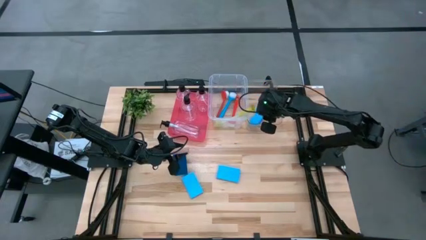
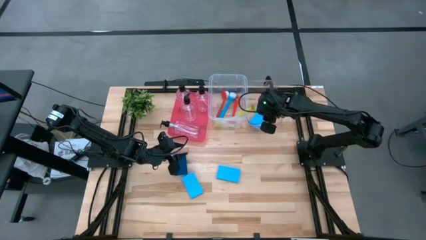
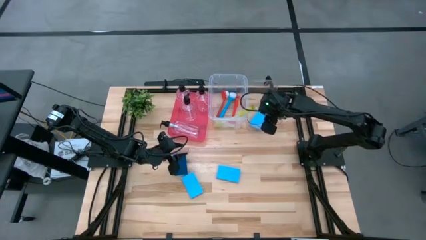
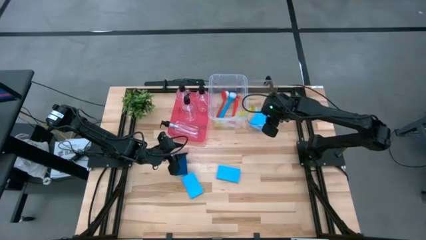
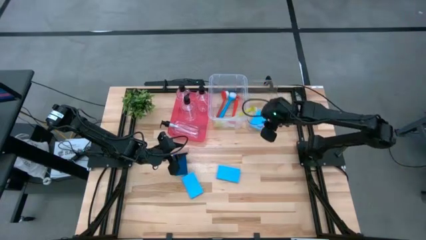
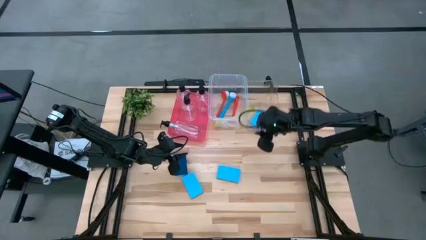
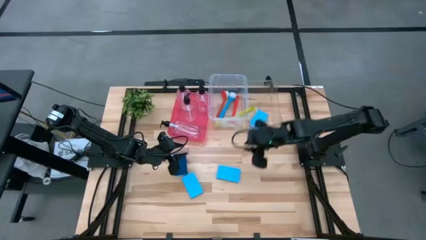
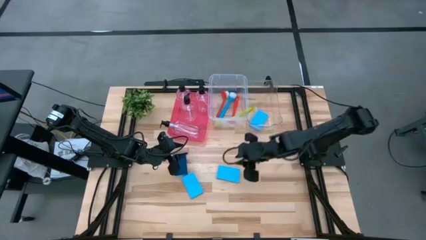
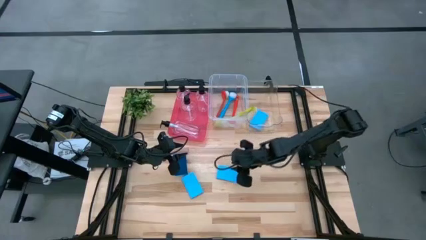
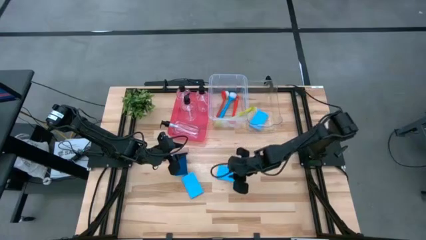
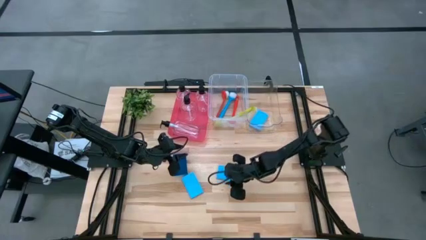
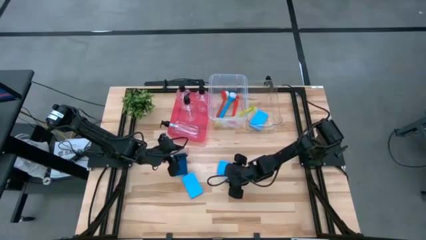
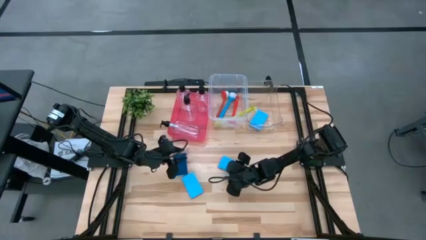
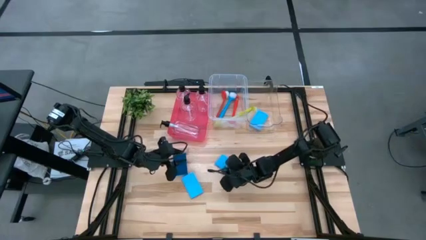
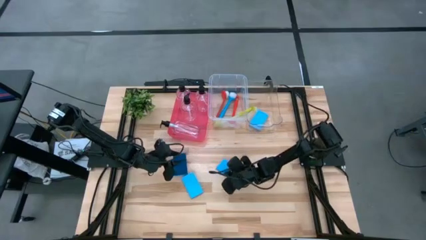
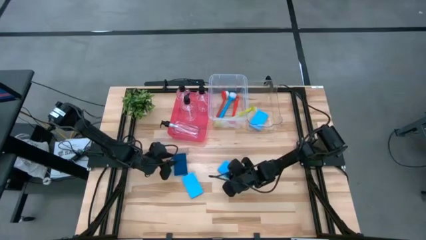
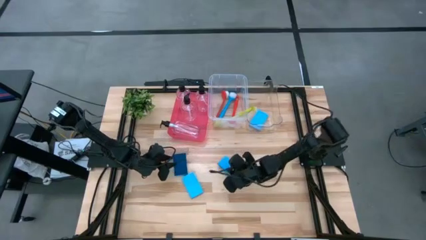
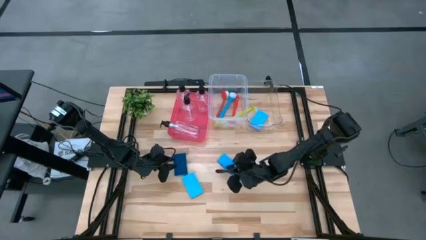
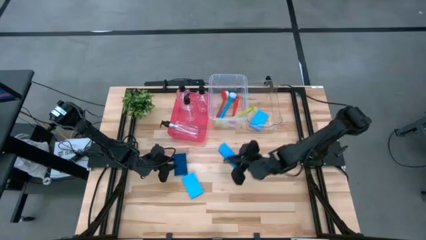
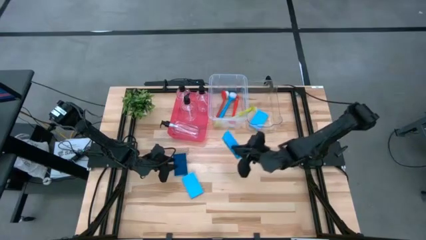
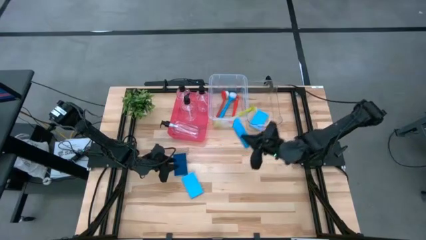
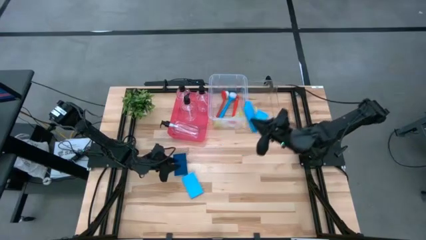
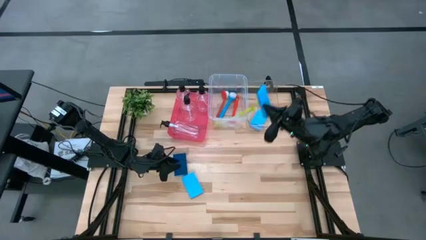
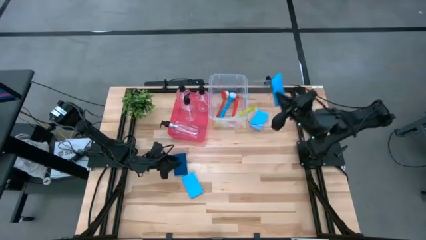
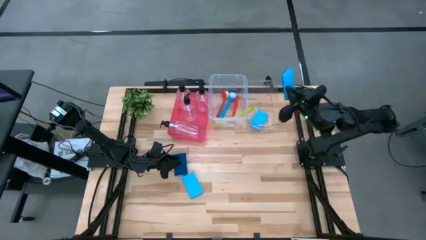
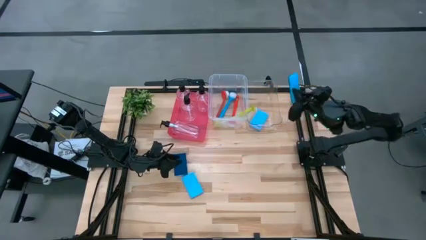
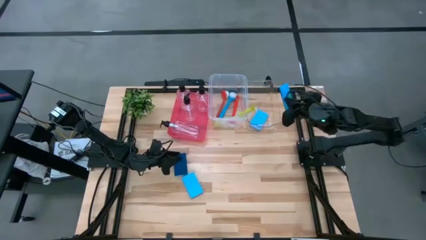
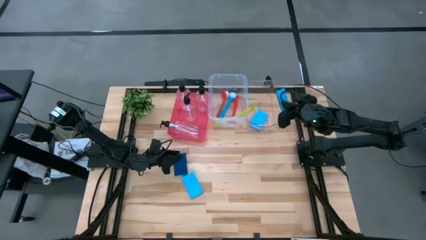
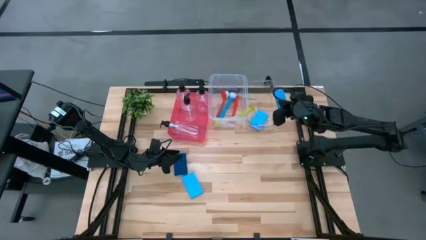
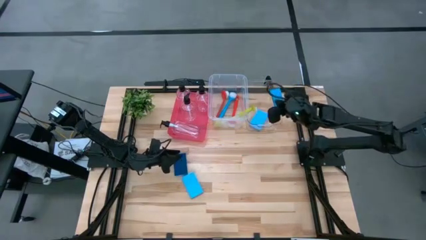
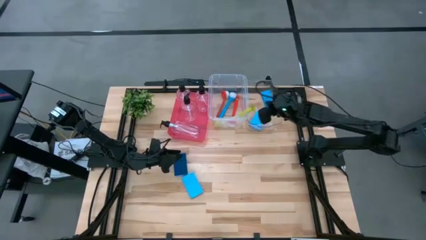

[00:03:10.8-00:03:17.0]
Task: Pick & Place Kitchen Sink Supplies
Put the bottom right blue sponge wipe into the transparent bin

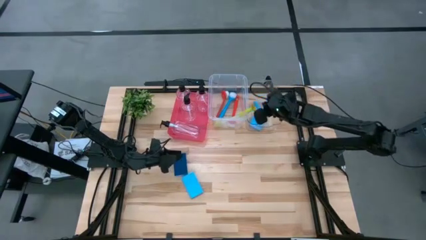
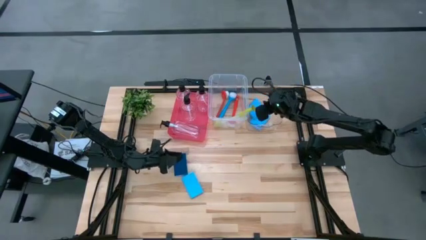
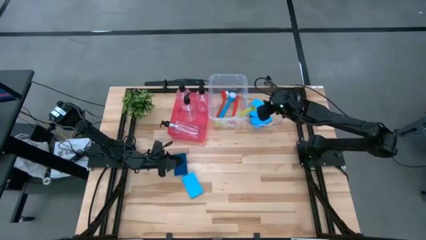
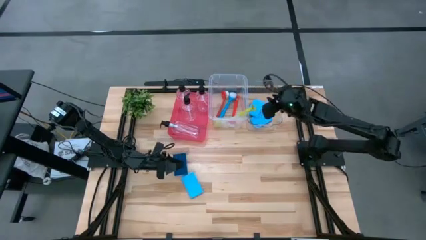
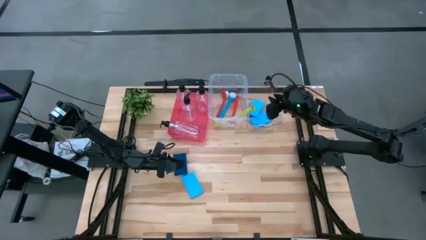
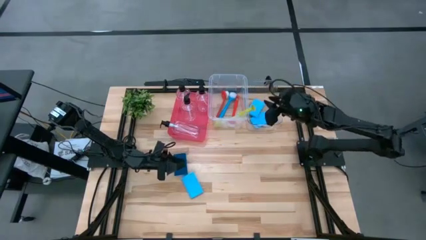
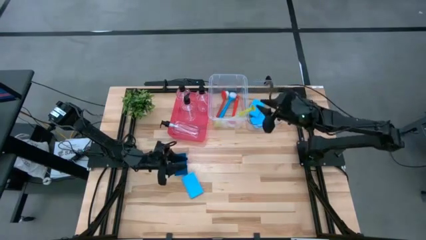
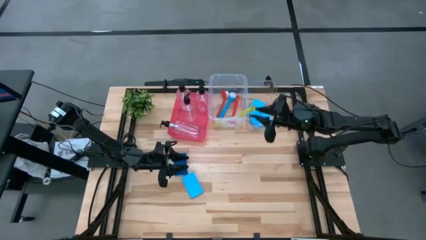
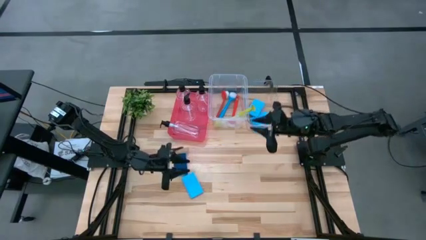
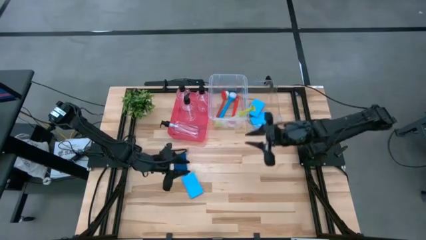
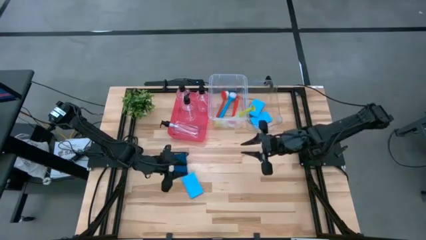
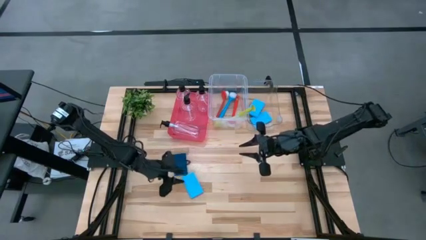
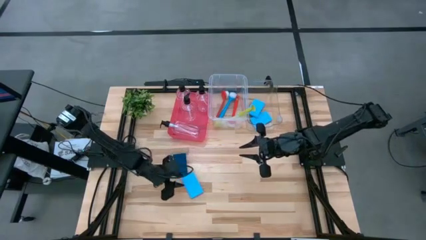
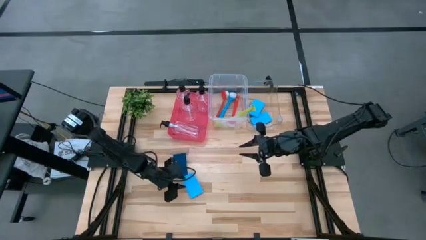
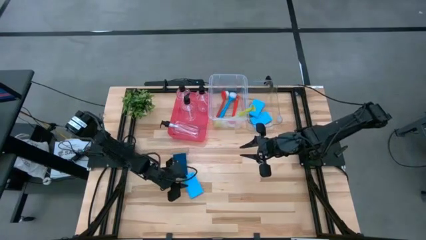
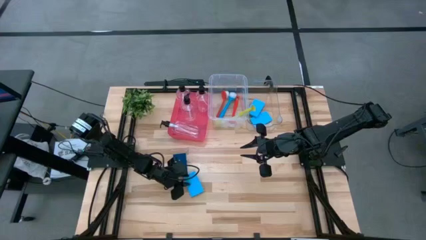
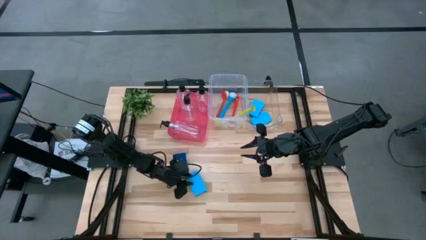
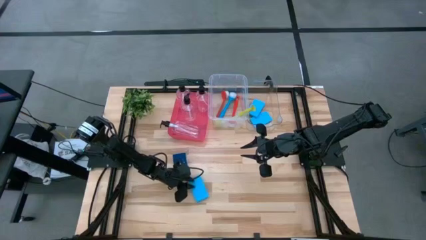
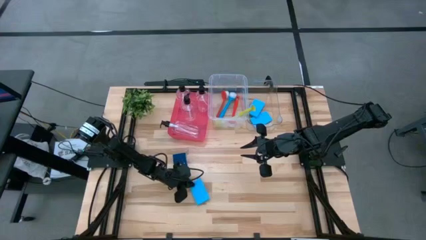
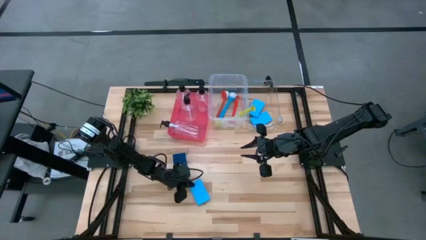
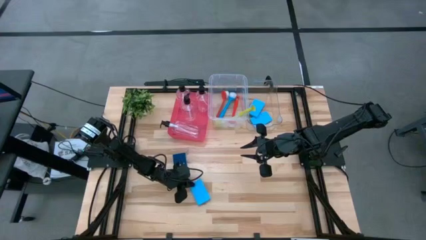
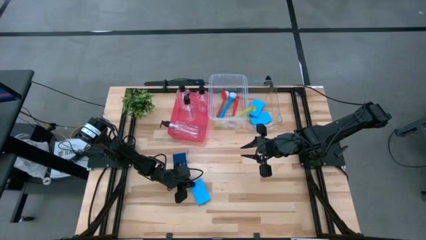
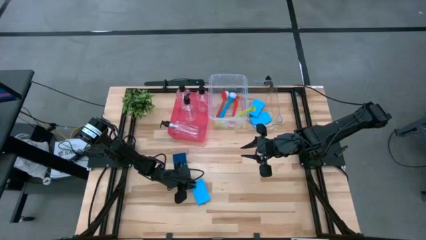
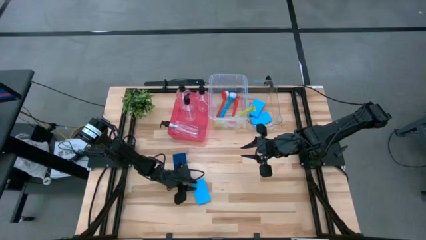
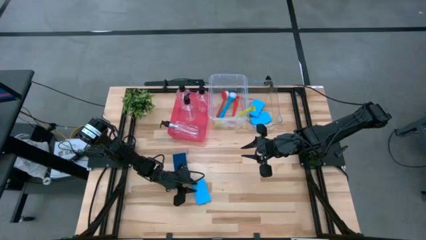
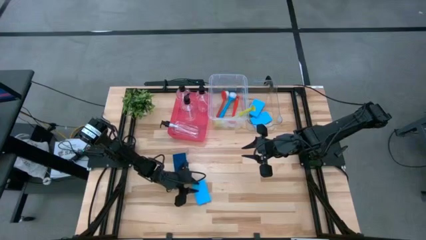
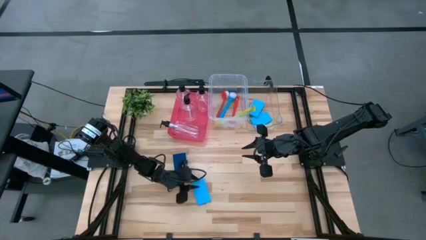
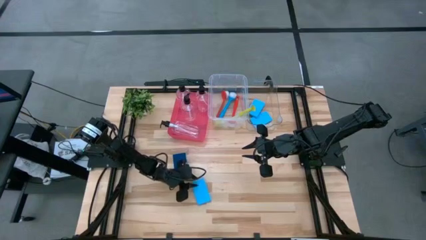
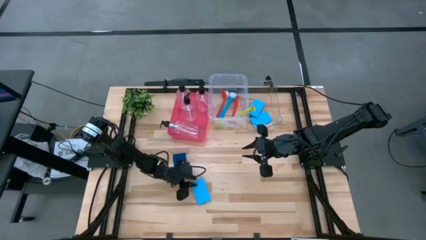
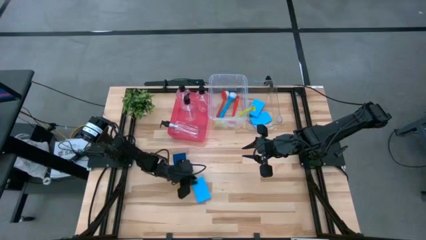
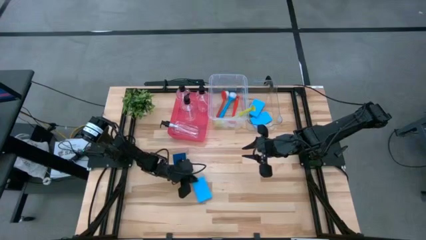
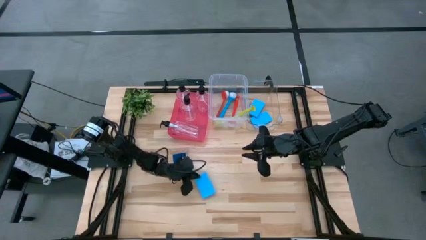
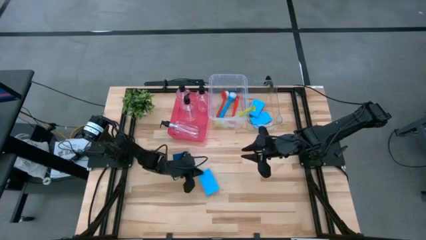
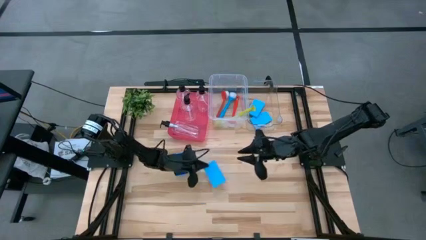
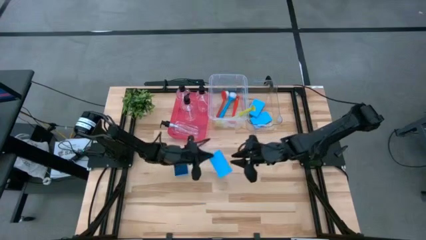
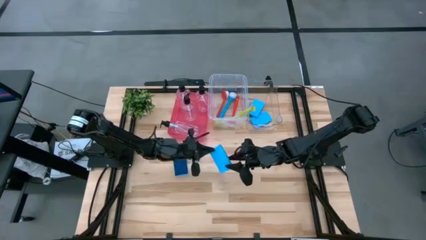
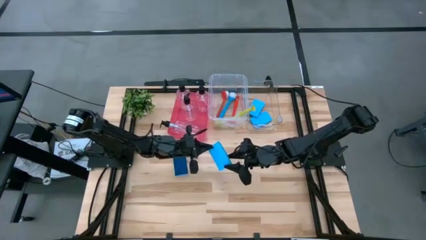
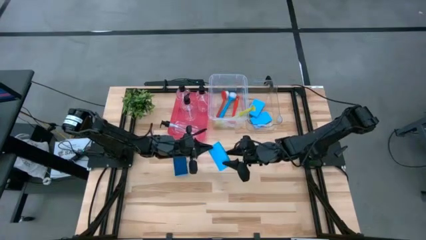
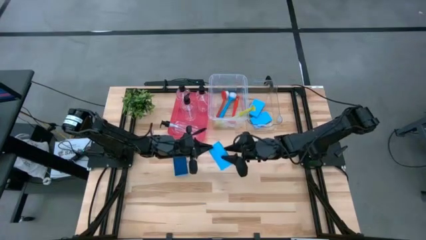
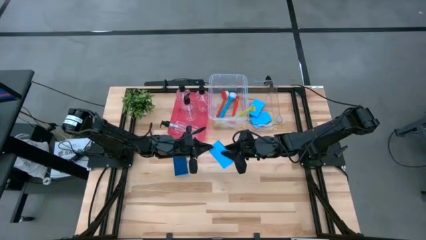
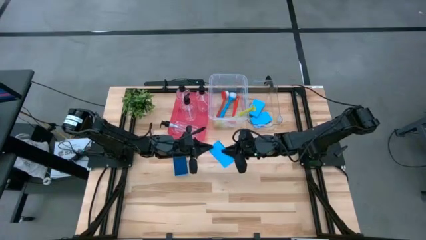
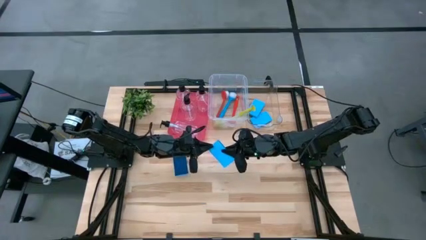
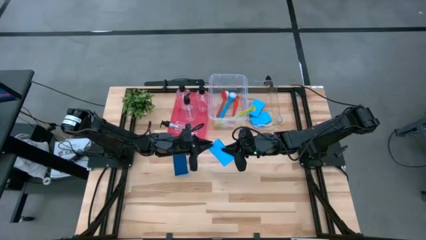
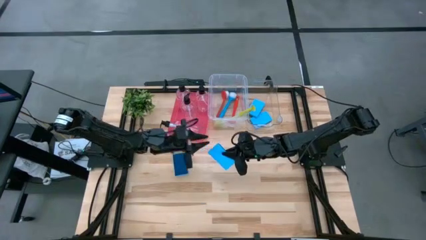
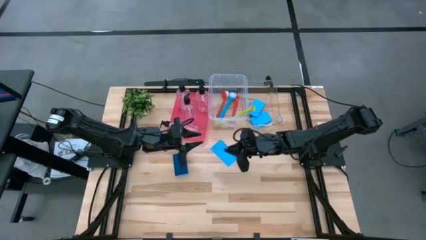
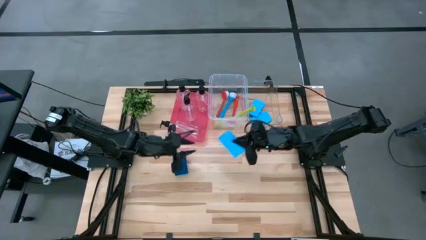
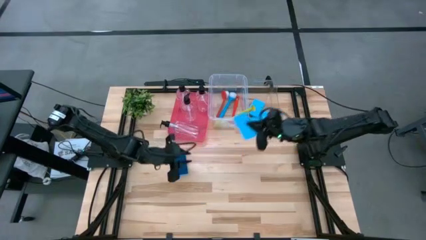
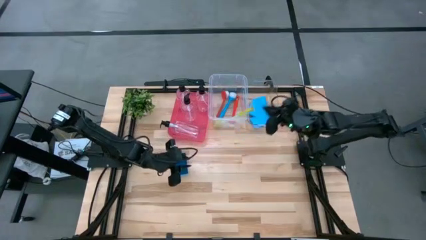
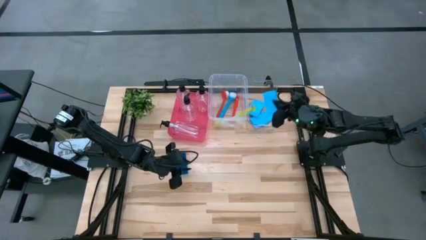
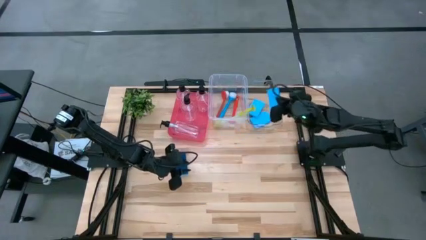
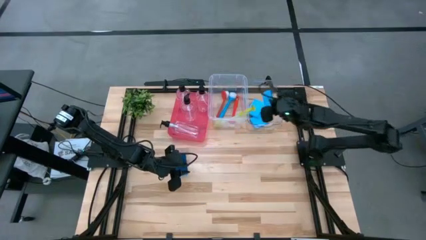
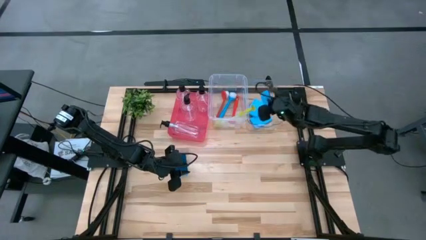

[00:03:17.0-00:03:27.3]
Put the bottom left blue sponge wipe into the transparent bin
